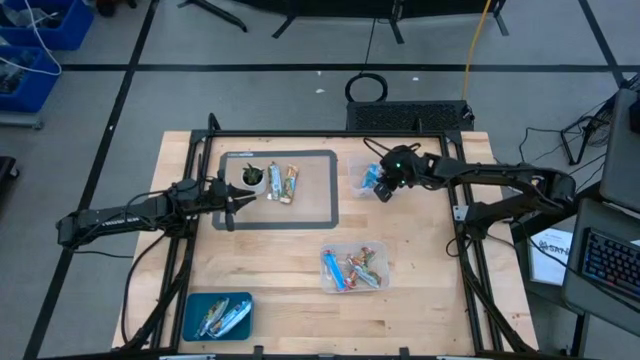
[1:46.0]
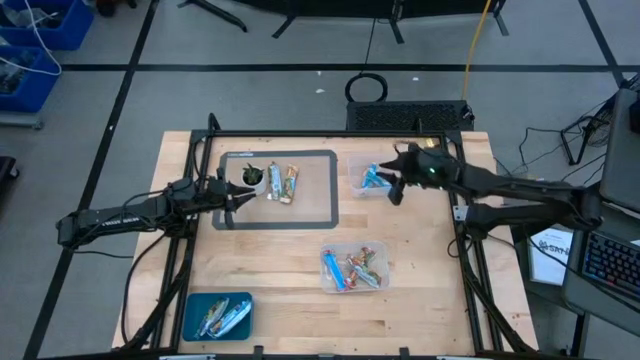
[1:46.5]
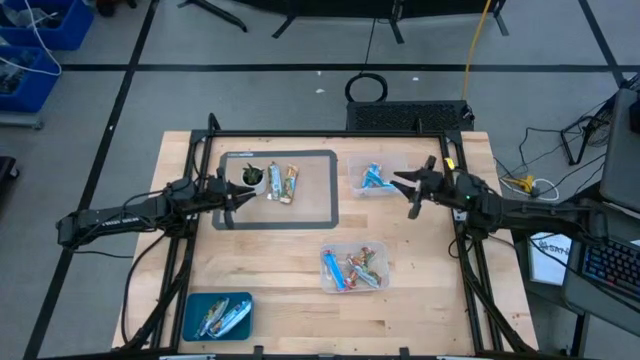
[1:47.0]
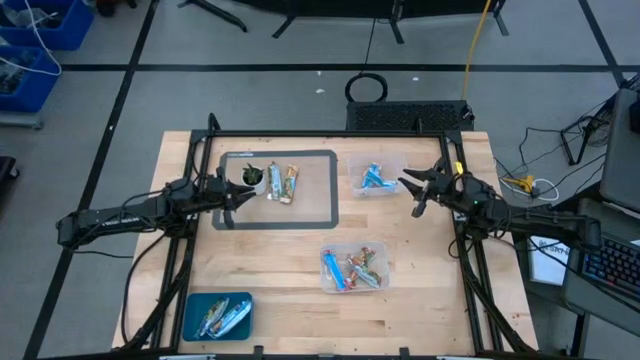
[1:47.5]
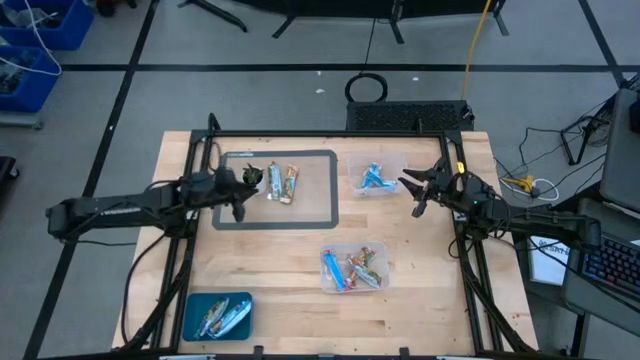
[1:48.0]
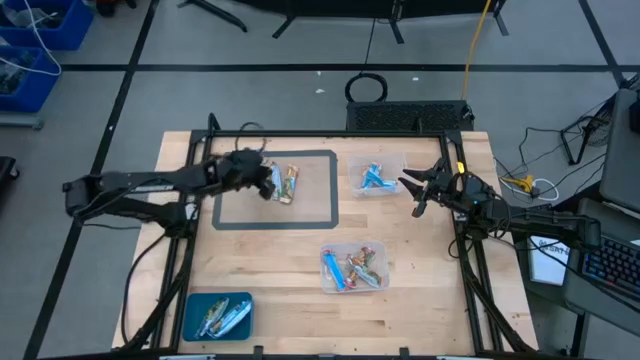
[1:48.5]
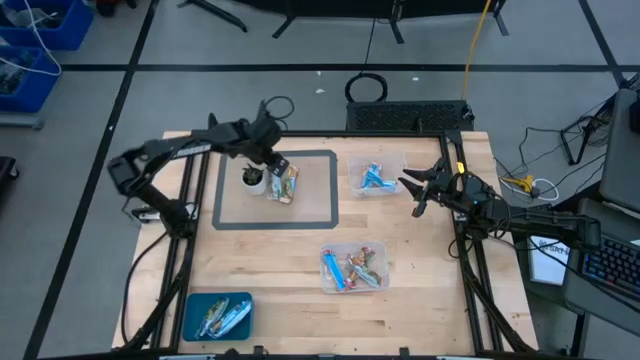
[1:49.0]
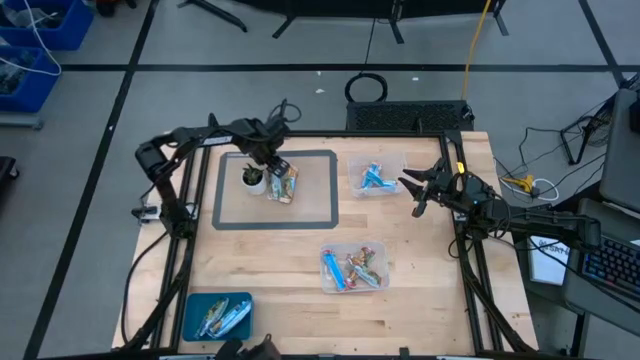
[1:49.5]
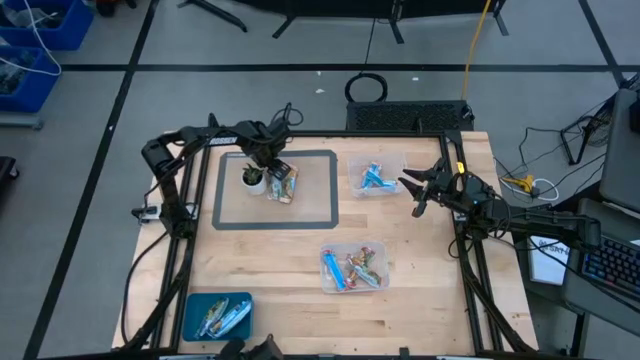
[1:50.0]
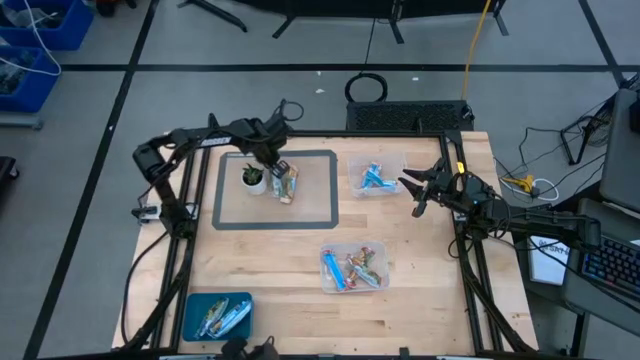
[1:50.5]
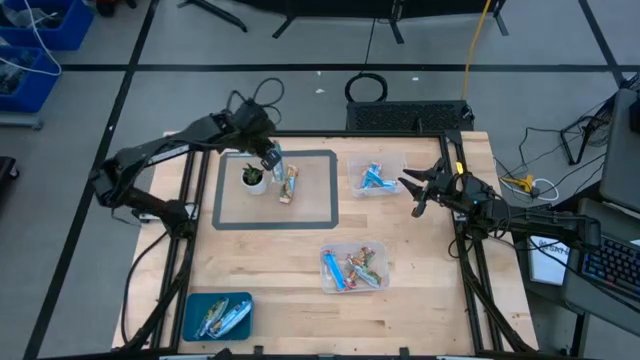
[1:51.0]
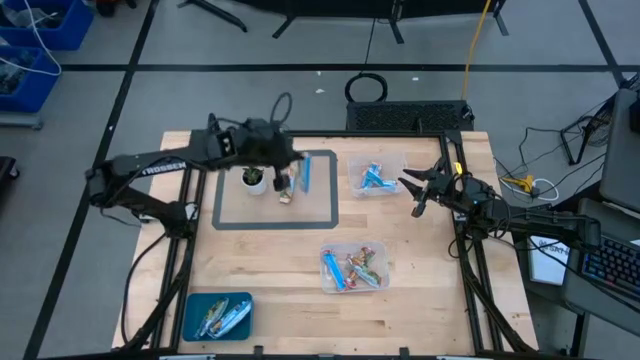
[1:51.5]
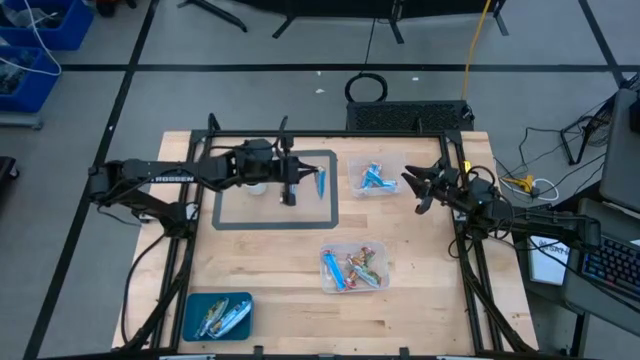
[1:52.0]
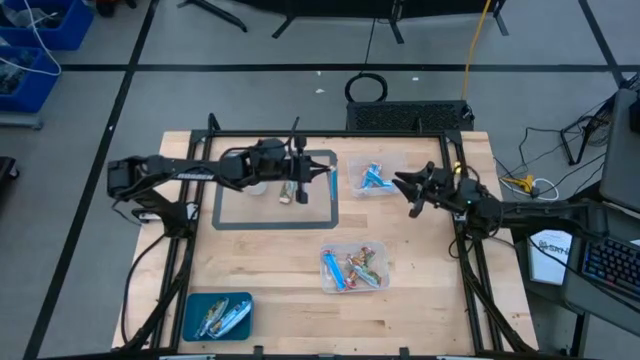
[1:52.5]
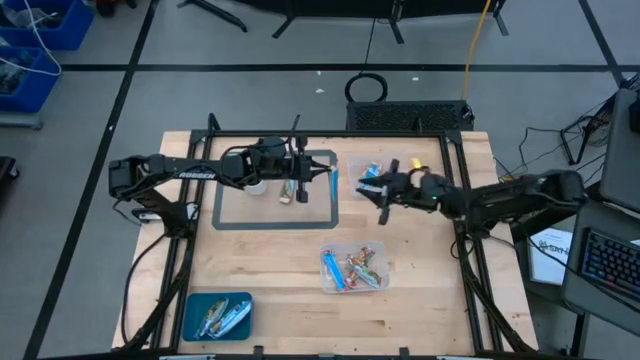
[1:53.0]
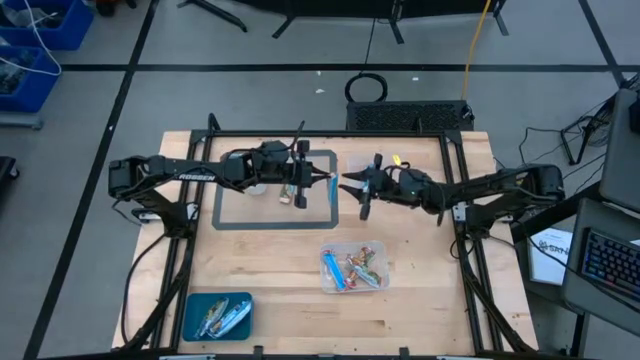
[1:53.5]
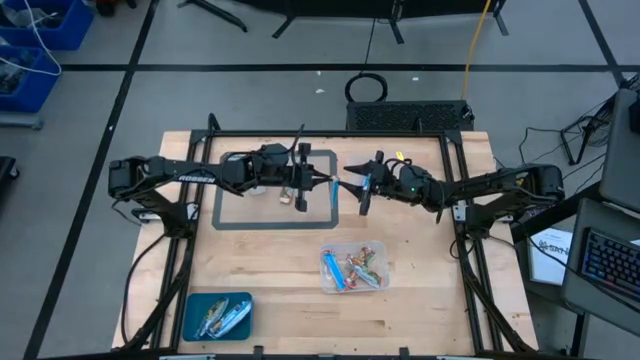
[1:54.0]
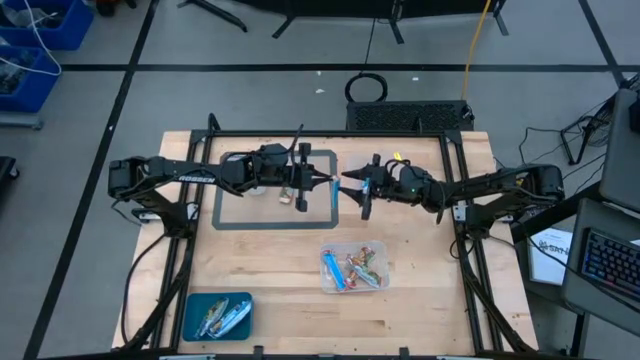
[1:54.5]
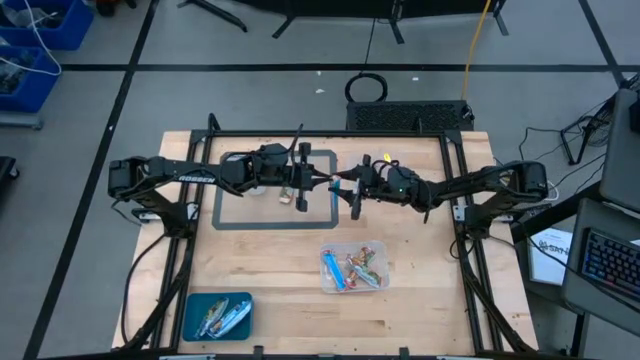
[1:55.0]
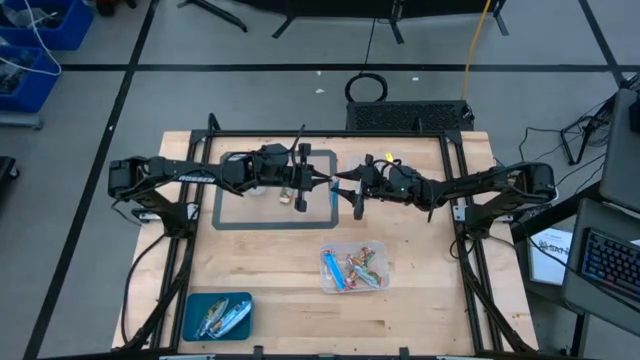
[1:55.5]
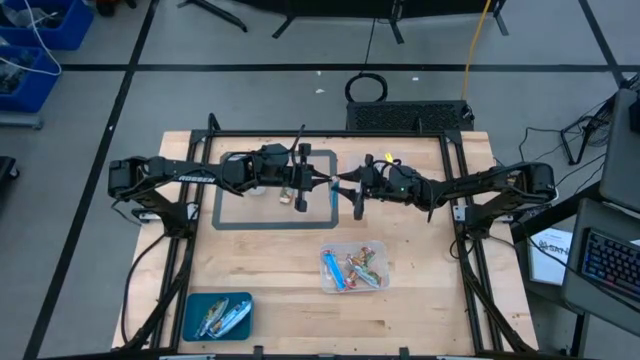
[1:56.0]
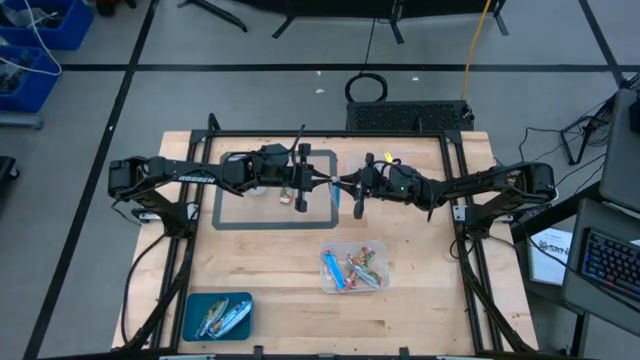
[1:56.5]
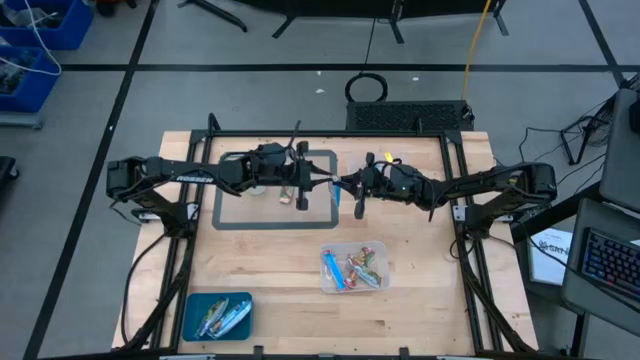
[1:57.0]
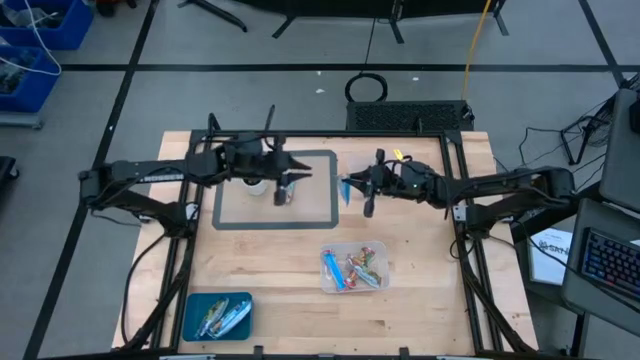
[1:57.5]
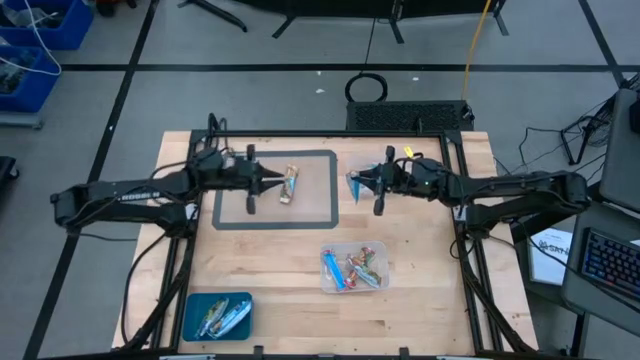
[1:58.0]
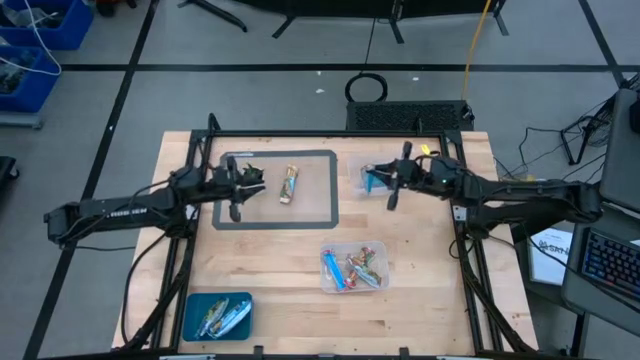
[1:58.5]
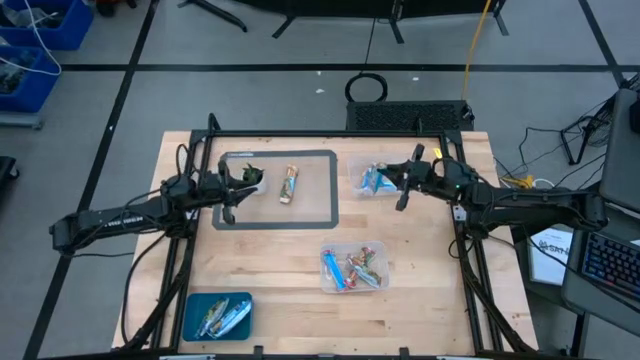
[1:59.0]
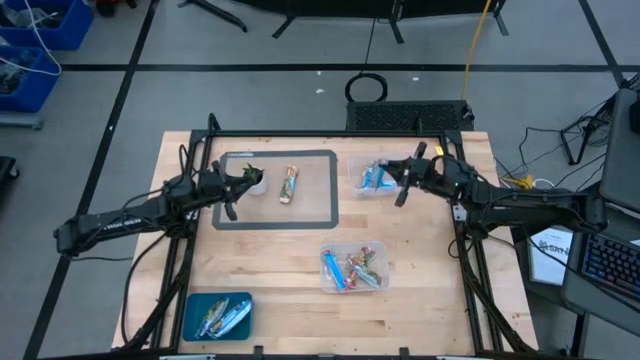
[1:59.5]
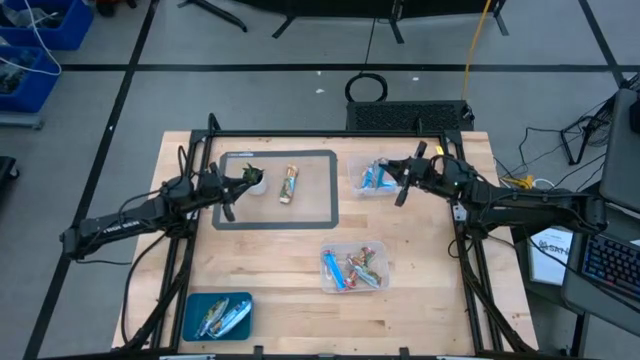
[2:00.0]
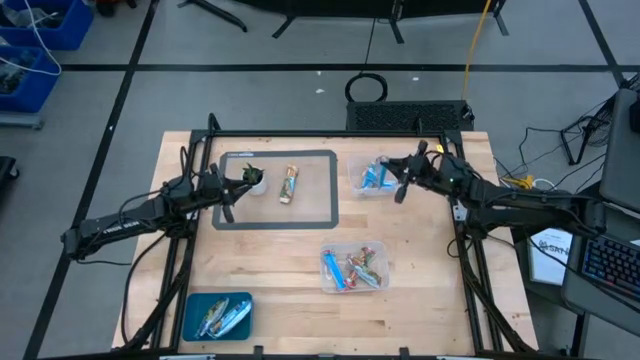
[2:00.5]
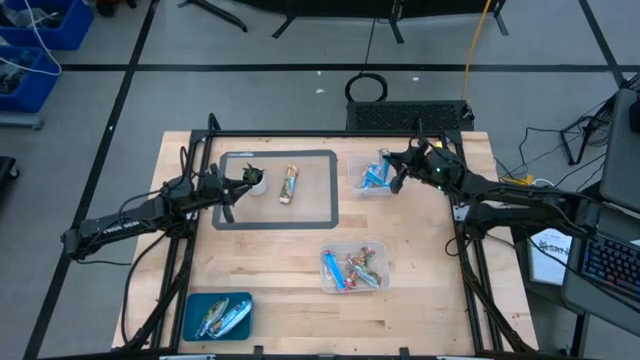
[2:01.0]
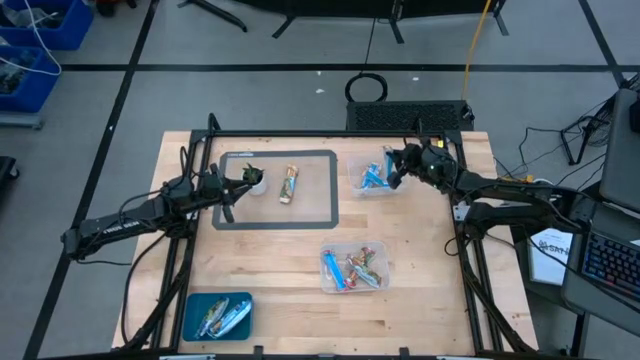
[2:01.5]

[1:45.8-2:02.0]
Task: Pick and place Granola Bars by type
Put the yellow granola bar into the top transparent bin

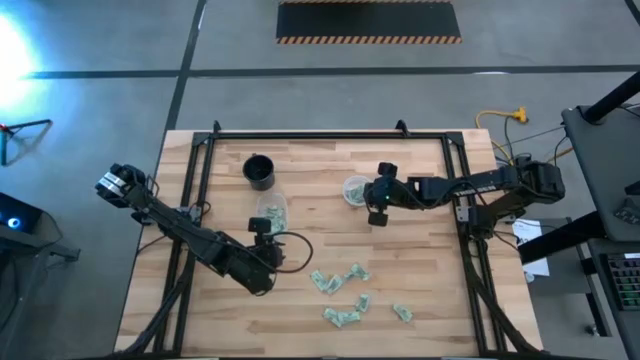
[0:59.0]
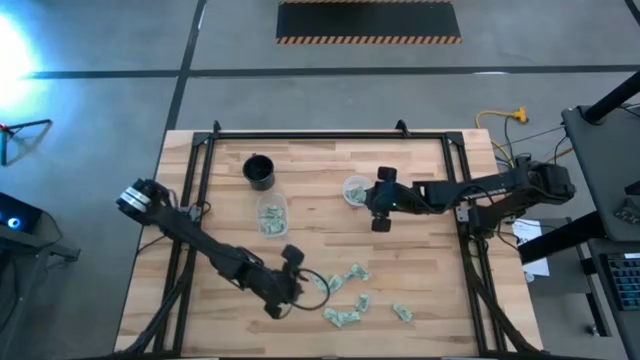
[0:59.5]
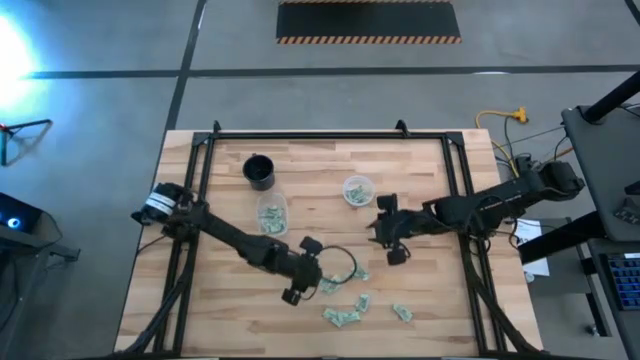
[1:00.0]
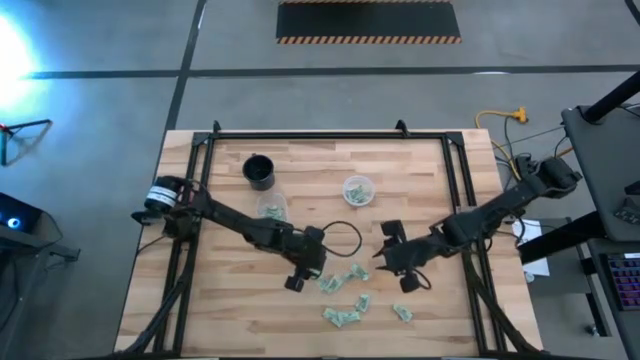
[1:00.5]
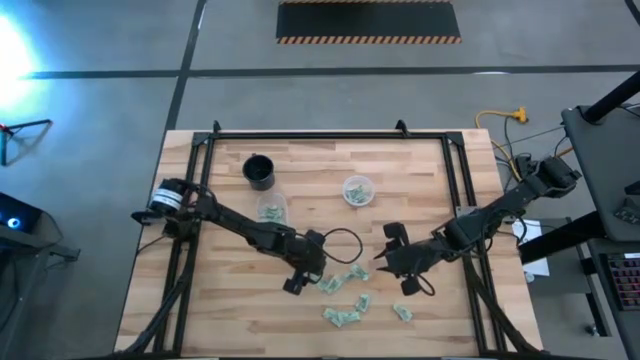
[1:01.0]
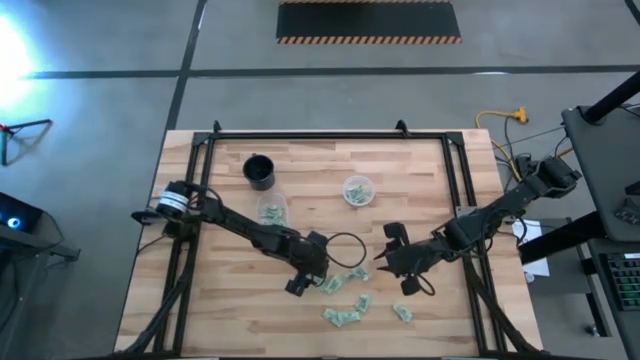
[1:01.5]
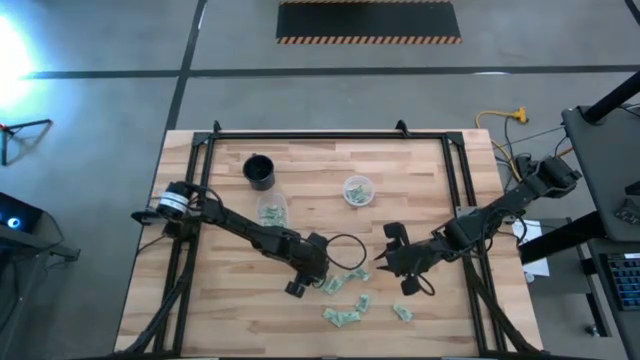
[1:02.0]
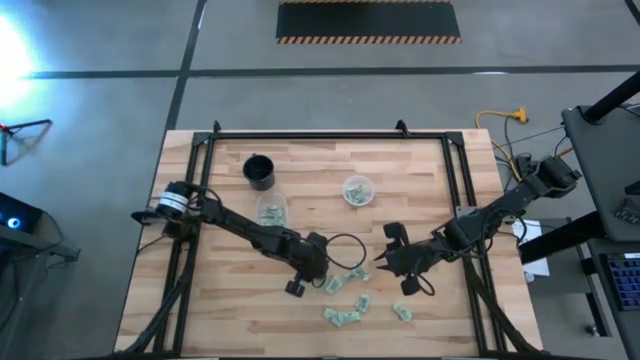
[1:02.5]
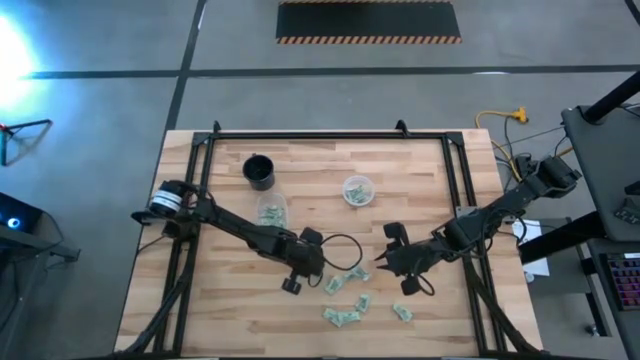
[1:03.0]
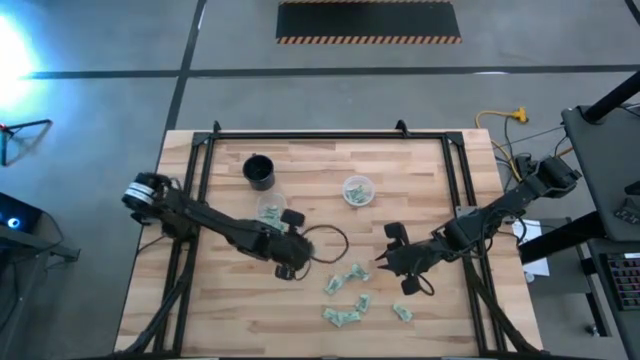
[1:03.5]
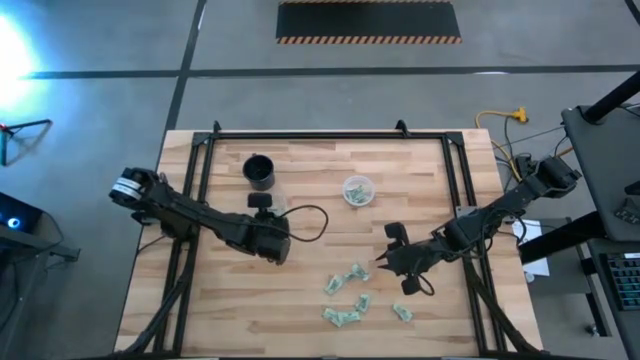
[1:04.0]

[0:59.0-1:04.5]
Task: Pick and place items into bin
Put the stevia packet into the left transparent bin

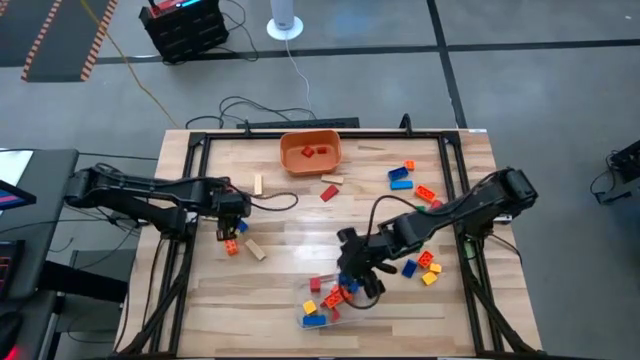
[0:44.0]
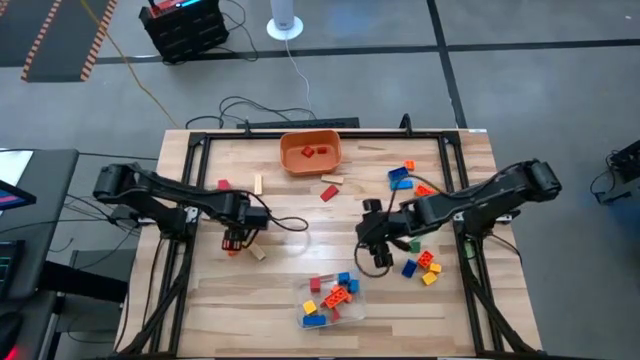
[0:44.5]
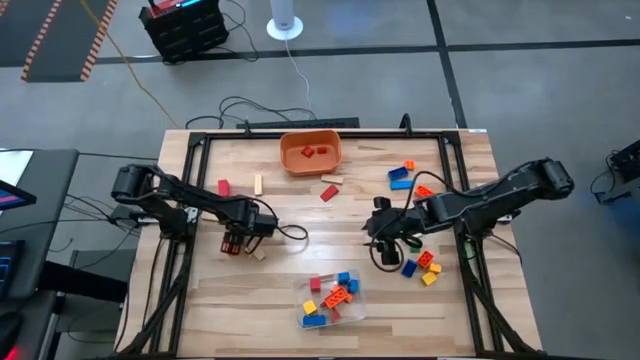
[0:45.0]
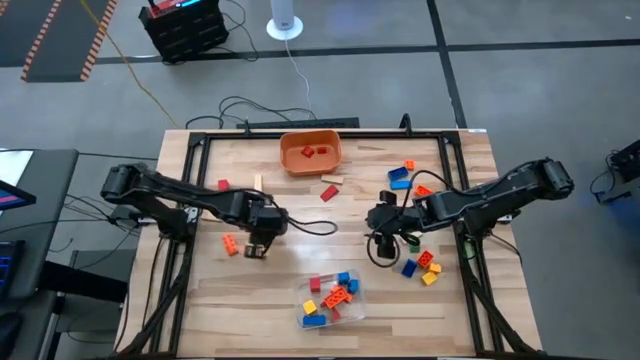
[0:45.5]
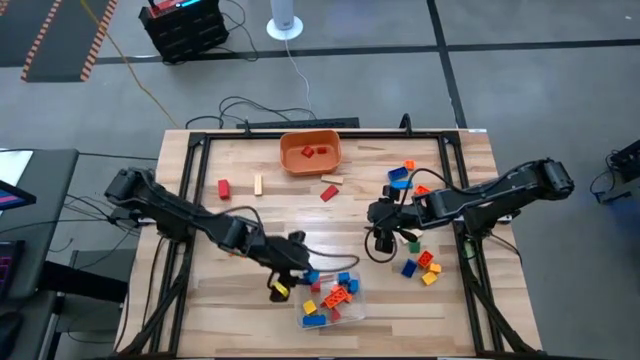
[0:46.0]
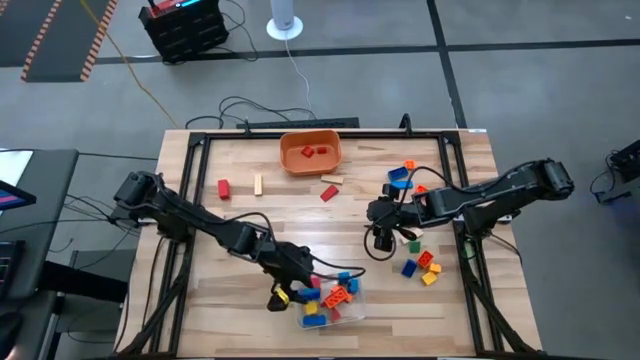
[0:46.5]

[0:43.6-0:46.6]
Task: Sort blocks by size
Put the large blue game piece into the transparent bin
